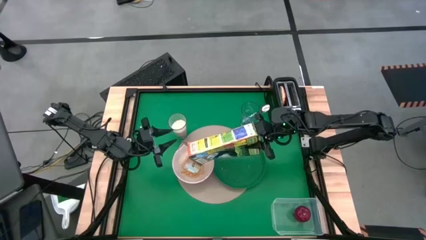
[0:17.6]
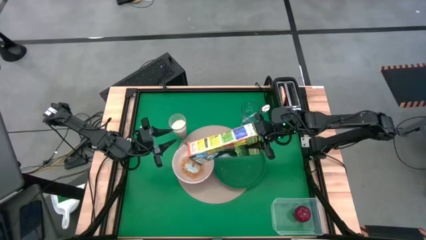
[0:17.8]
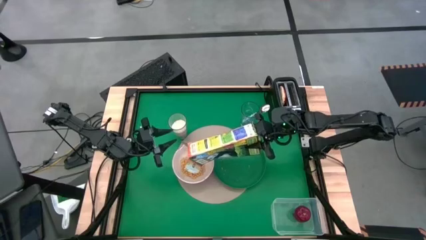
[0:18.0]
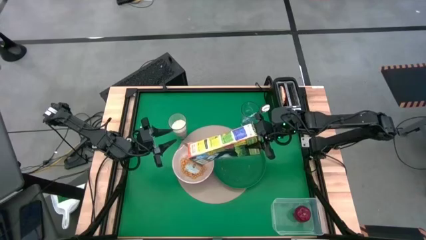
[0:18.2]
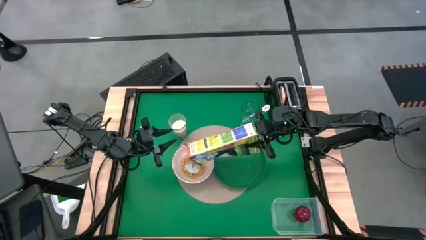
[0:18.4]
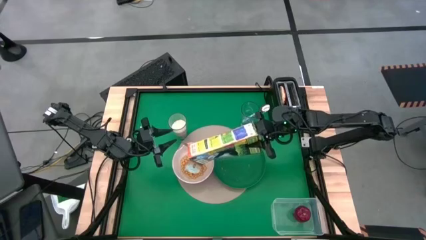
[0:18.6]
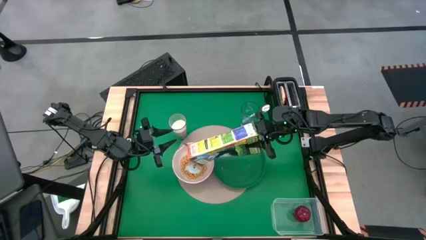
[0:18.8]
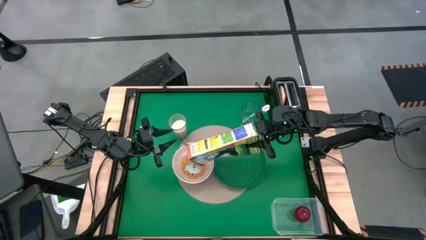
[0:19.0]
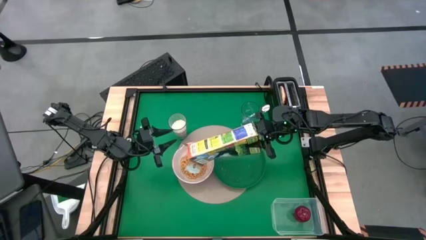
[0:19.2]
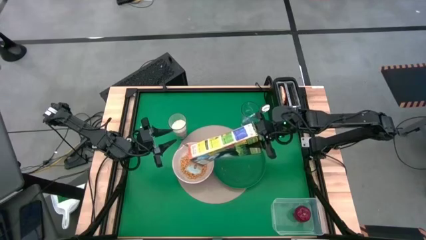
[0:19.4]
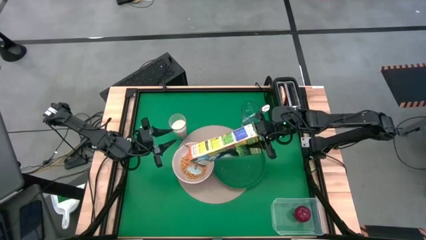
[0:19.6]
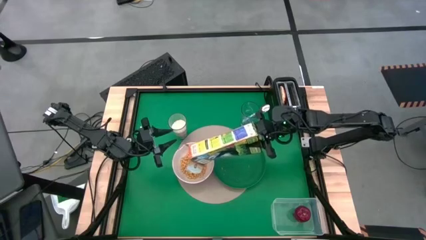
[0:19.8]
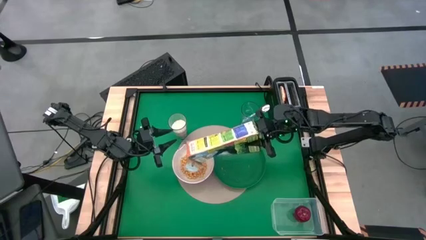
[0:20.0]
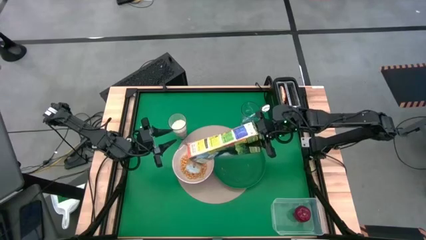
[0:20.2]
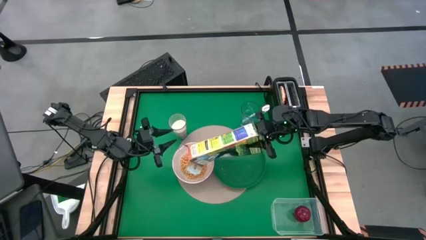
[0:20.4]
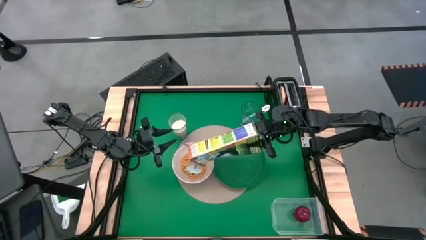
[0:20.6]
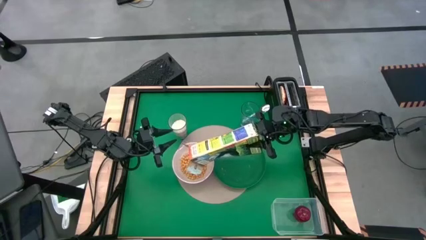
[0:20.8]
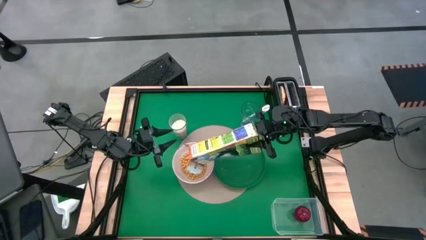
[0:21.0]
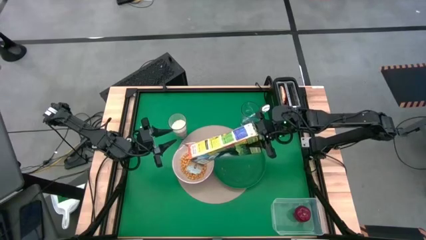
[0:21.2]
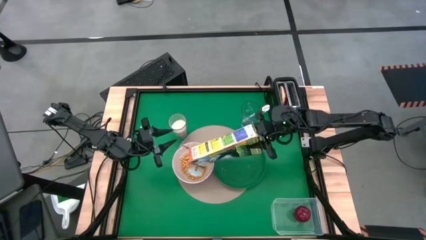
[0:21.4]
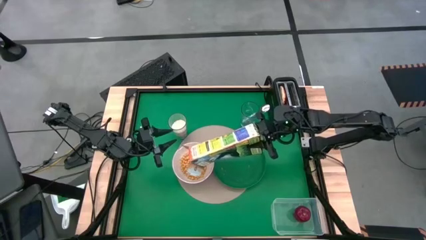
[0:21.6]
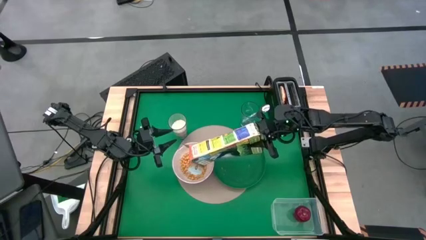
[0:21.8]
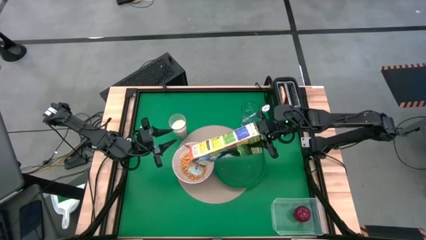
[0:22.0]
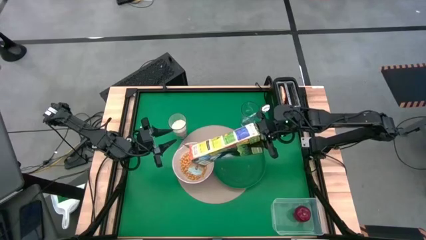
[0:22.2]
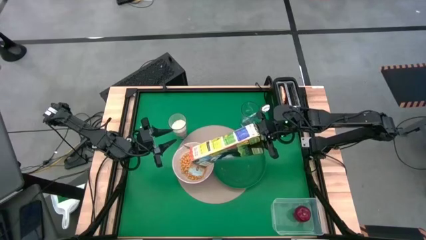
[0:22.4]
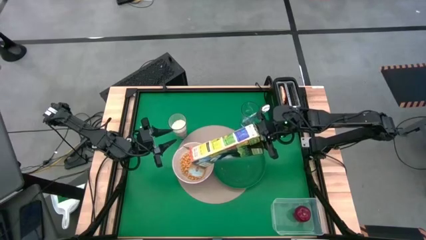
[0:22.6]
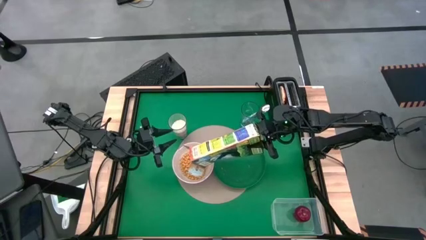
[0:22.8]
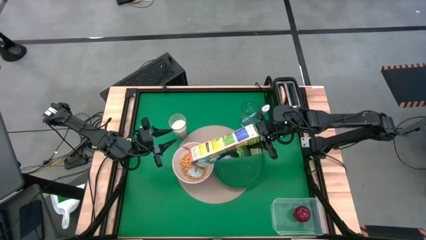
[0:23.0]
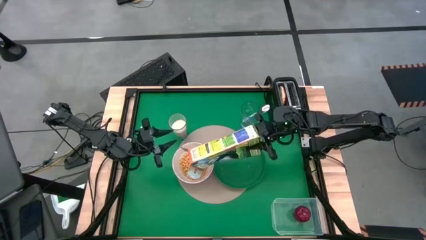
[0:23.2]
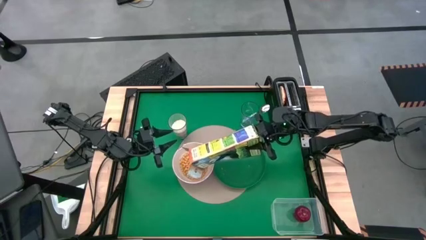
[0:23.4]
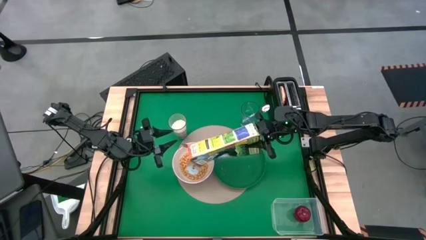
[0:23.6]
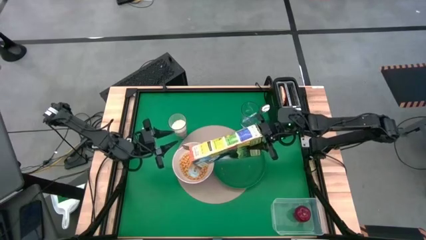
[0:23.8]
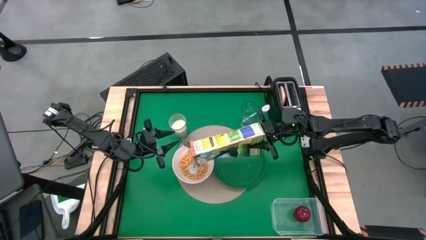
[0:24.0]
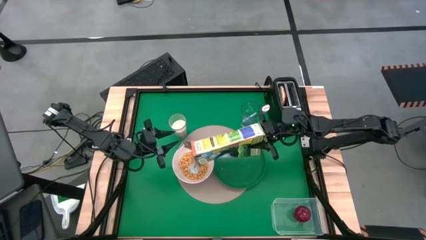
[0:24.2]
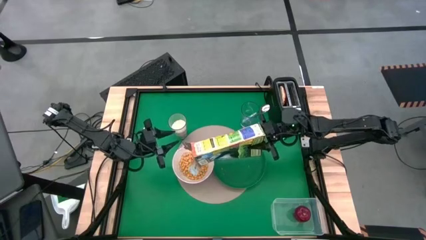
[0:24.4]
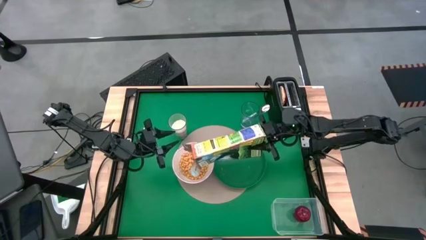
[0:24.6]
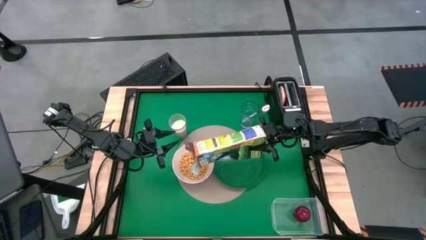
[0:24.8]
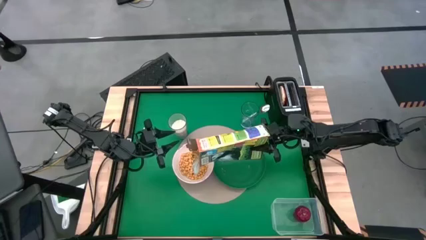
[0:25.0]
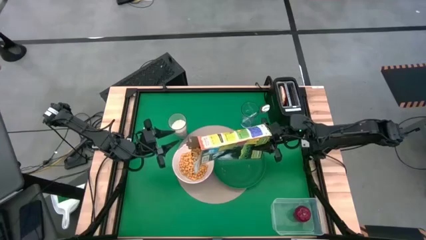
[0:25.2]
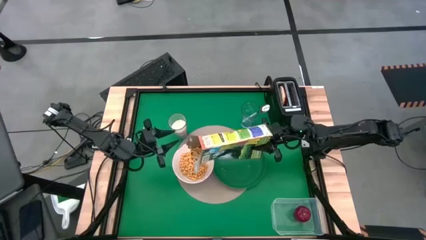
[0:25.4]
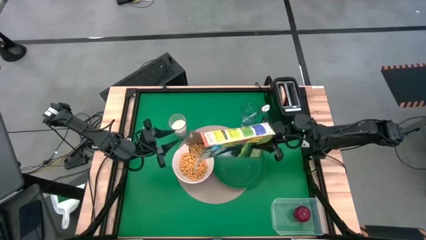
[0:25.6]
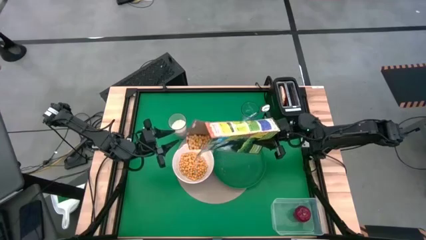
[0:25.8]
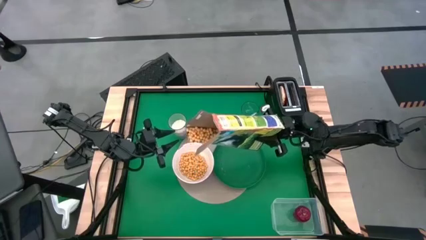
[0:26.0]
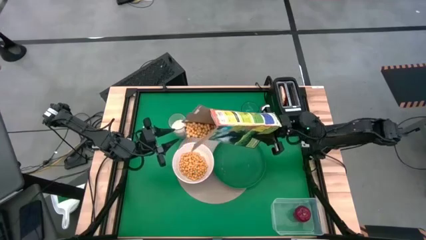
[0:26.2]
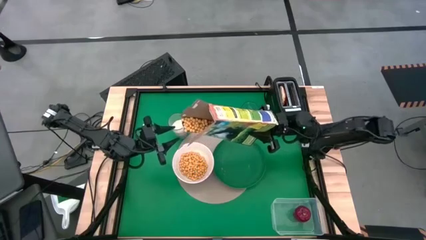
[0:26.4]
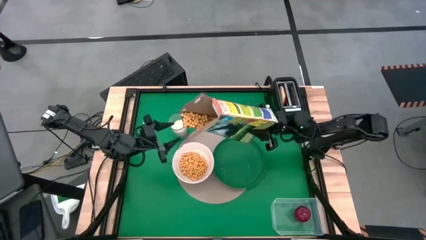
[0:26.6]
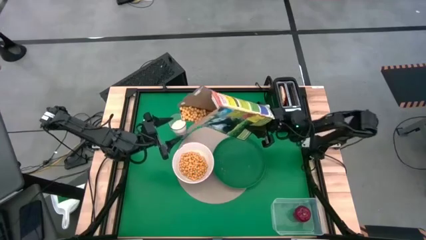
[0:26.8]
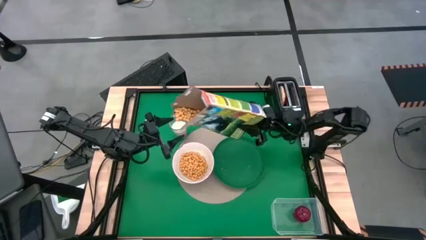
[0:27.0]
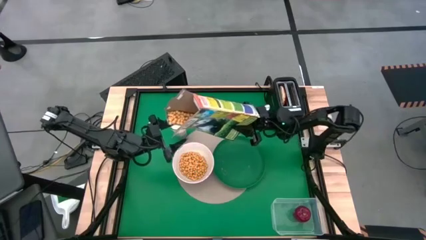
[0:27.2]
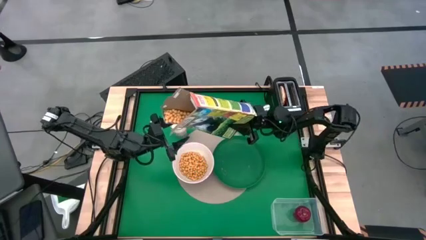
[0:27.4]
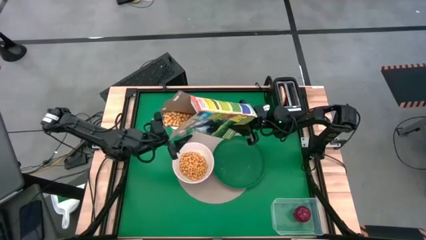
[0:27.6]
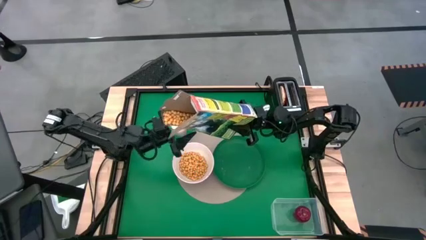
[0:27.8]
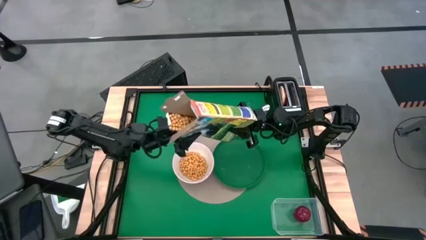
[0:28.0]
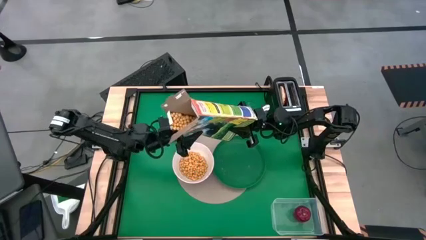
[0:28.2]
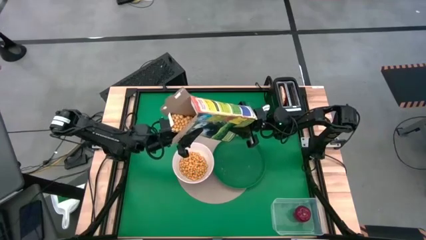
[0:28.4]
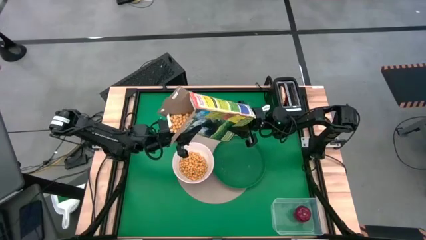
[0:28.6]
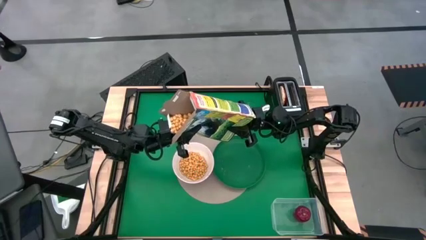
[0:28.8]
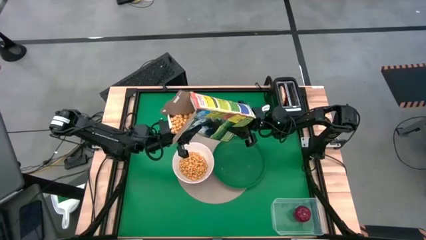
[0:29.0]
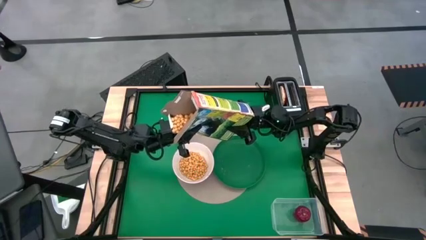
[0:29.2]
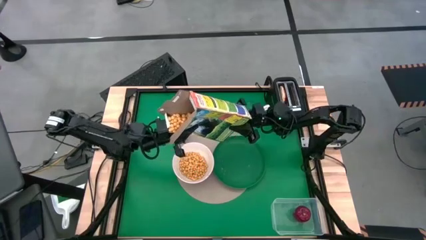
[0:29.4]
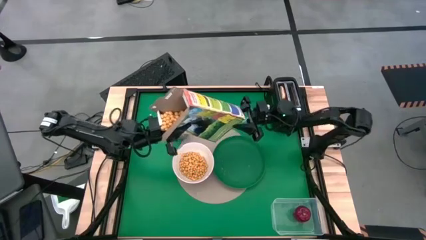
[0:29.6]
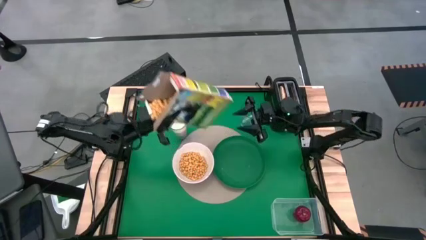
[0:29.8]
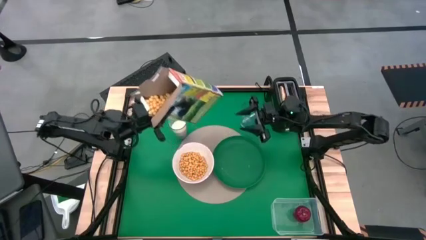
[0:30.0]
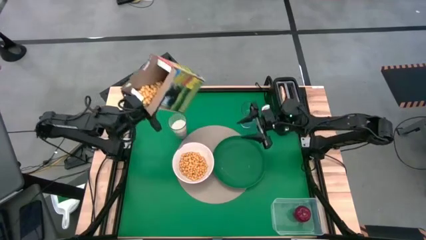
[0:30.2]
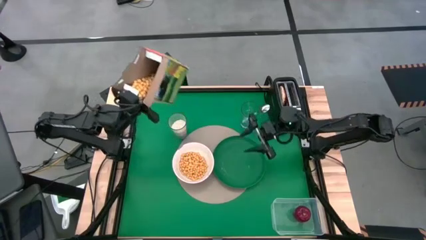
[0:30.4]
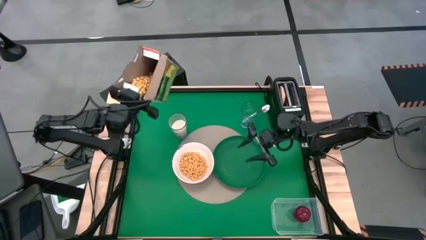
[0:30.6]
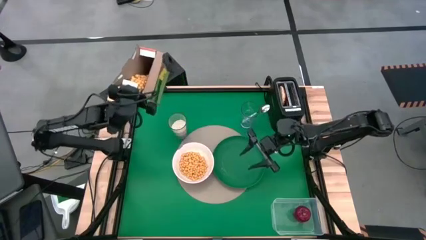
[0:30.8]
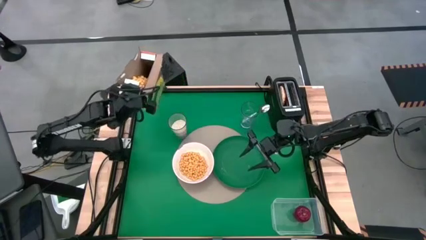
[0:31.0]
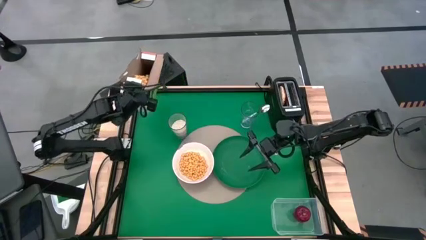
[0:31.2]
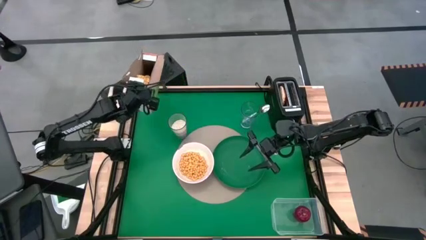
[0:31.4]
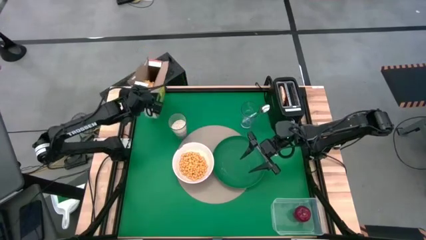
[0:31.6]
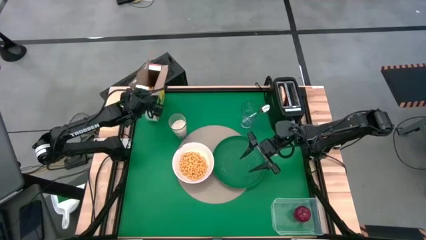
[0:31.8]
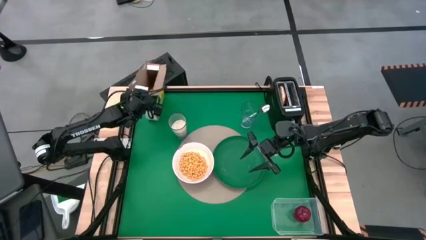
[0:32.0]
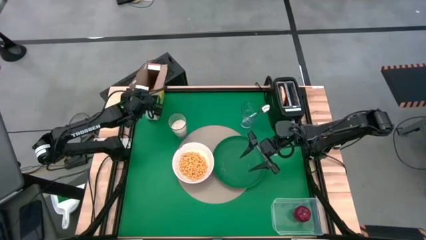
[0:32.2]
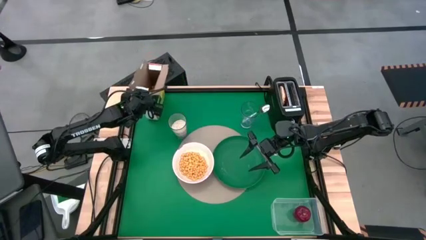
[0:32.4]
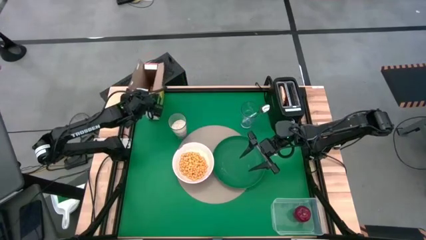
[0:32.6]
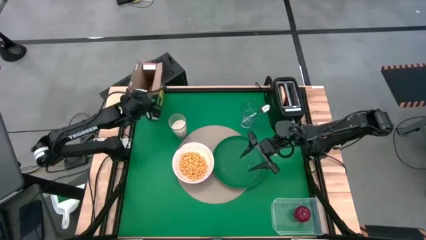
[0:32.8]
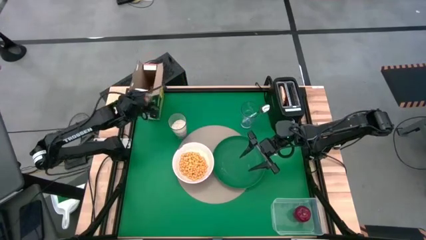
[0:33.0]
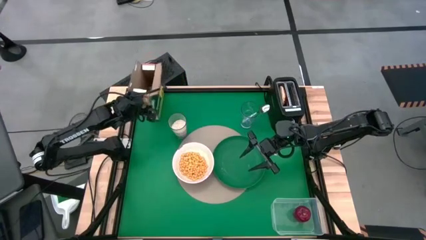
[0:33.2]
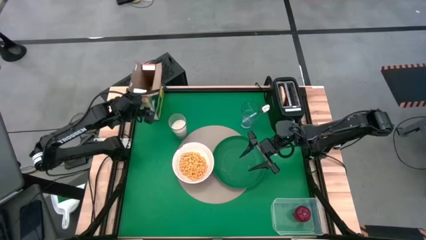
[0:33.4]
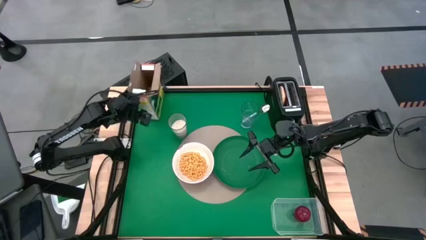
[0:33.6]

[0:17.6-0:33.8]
Task: Arrange a breakfast setting
Pour the cereal from the cereal box into the bowl
